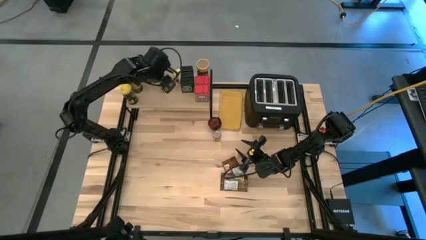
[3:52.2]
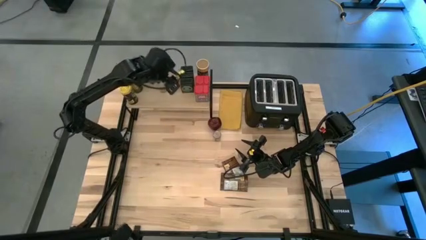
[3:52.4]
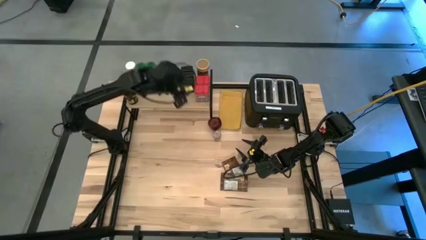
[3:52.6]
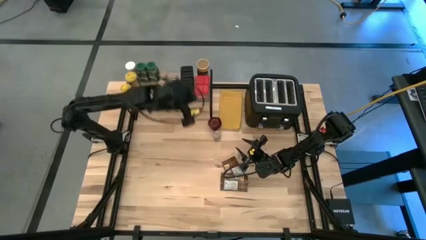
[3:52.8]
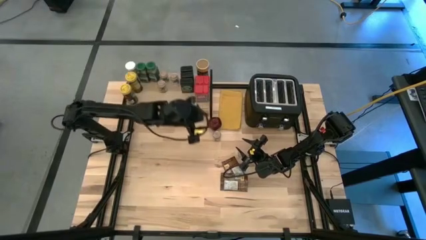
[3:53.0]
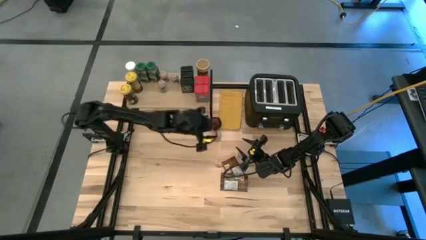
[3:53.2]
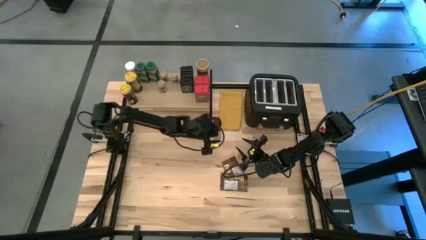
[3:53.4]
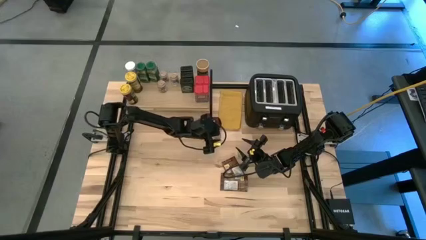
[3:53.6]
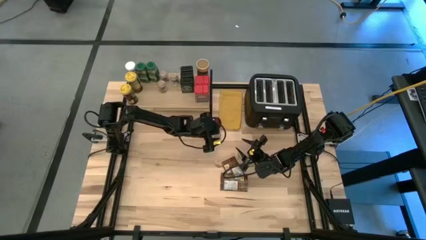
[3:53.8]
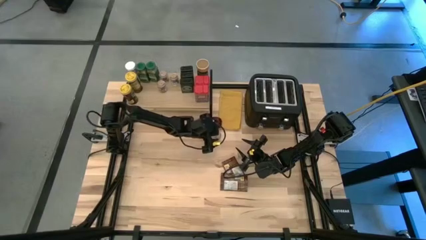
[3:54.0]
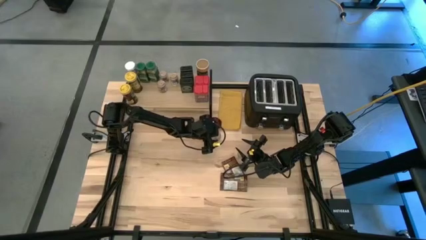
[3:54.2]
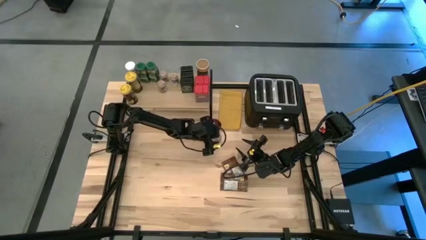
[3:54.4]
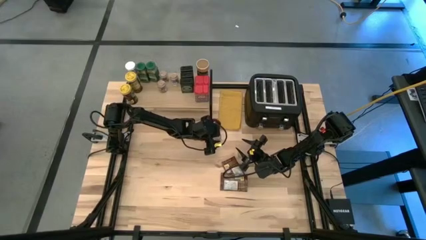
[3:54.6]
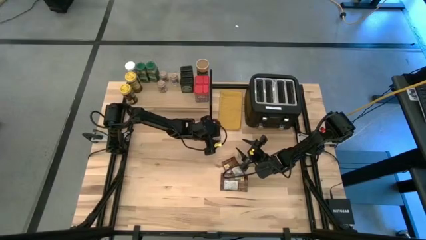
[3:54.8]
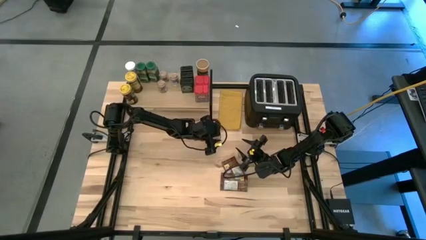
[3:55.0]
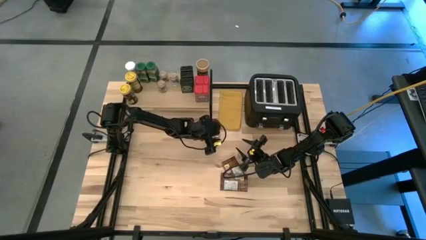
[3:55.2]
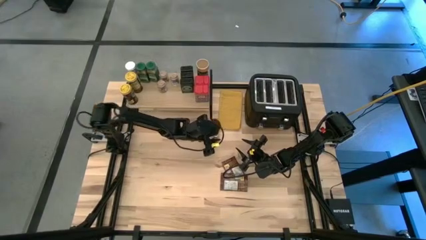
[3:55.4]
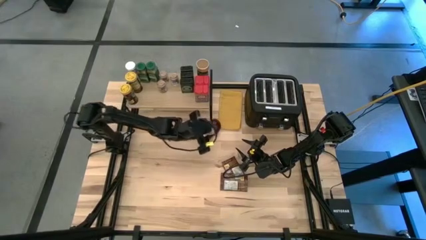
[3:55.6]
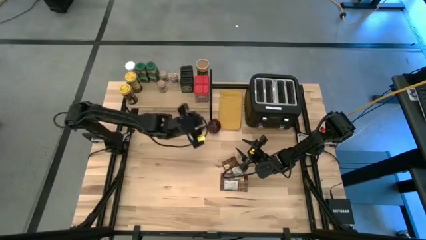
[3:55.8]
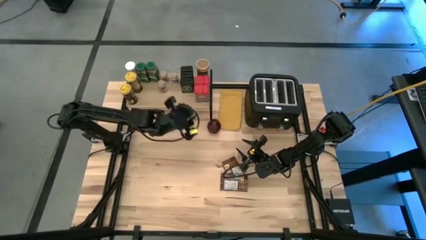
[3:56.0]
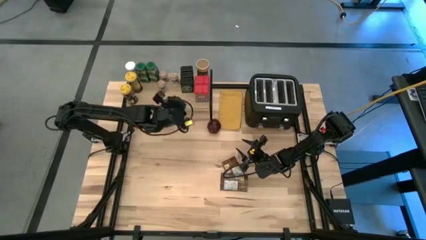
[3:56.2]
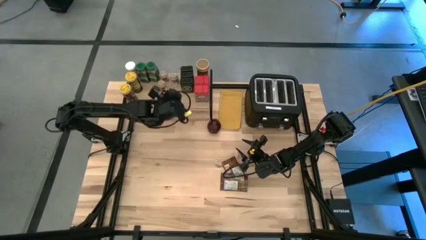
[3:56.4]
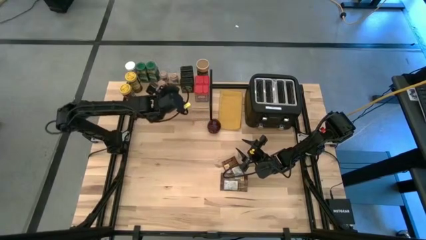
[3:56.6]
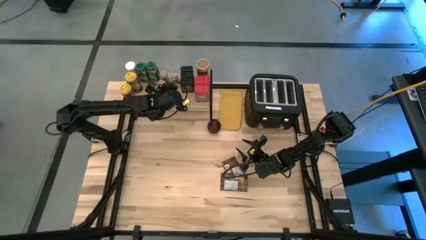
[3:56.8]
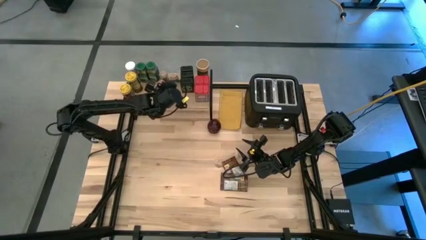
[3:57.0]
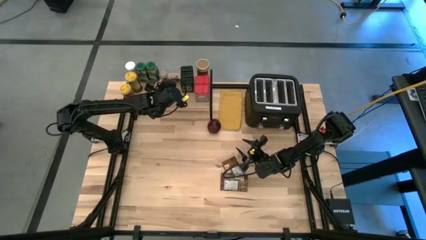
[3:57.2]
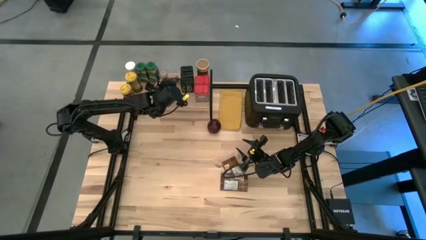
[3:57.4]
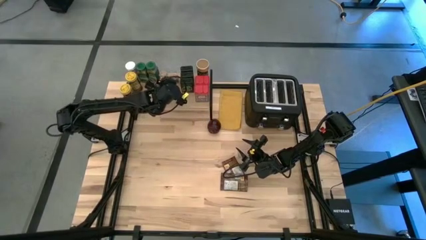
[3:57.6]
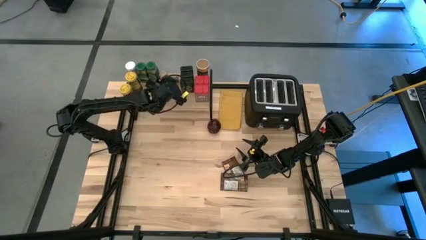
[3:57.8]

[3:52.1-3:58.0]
Task: Shelf spices
Put the brown seasoning bottle aligned with the other brown seasoning bottle on the shelf

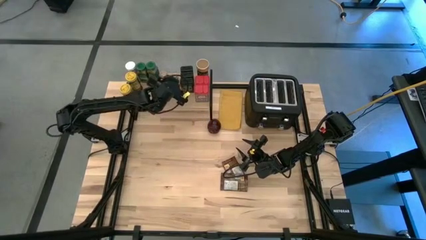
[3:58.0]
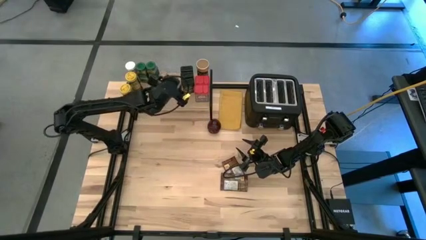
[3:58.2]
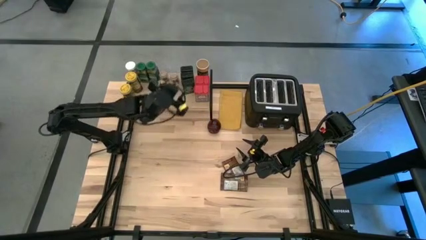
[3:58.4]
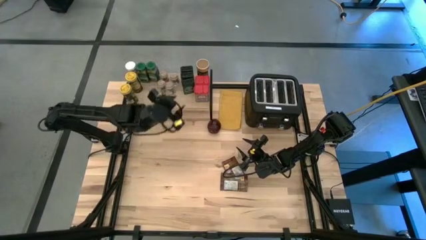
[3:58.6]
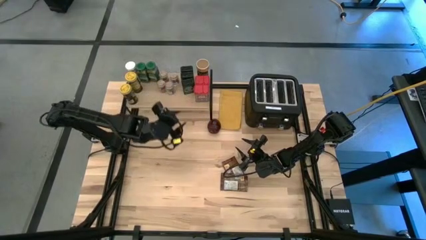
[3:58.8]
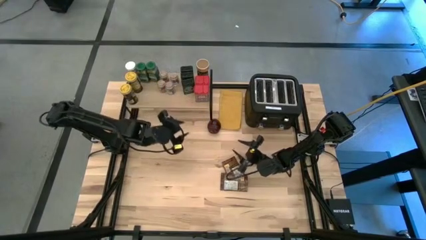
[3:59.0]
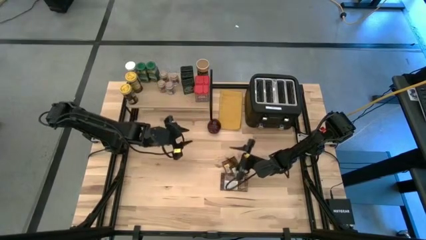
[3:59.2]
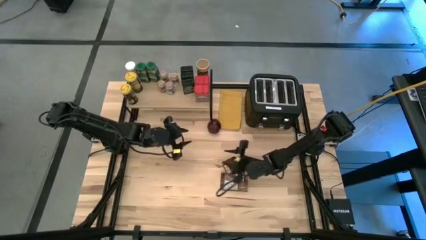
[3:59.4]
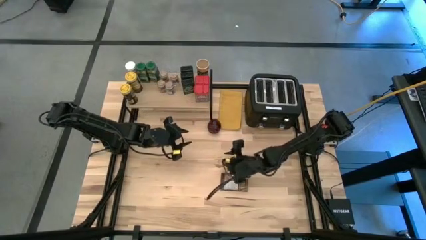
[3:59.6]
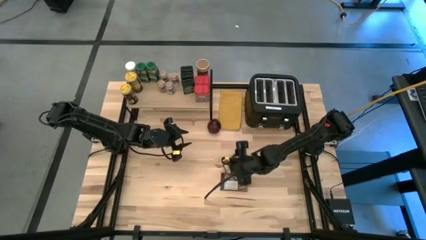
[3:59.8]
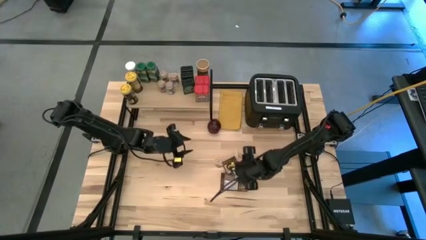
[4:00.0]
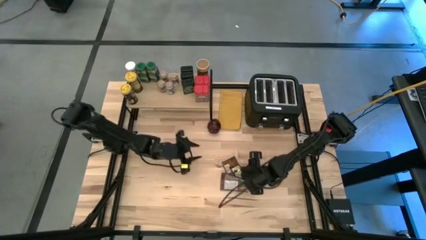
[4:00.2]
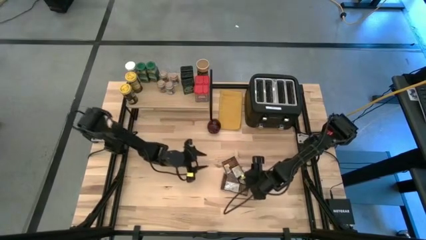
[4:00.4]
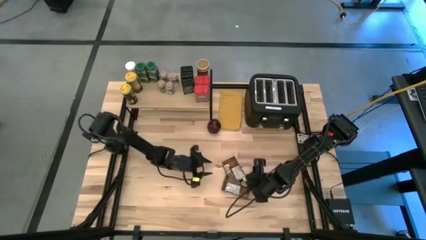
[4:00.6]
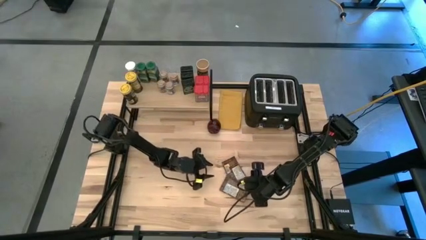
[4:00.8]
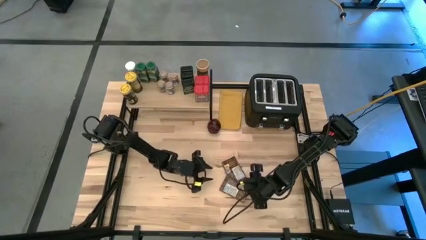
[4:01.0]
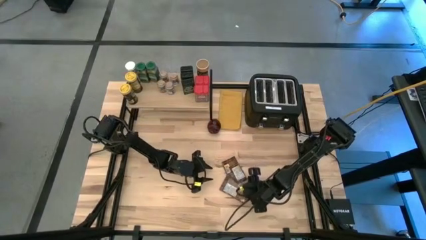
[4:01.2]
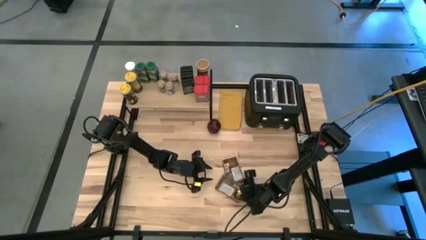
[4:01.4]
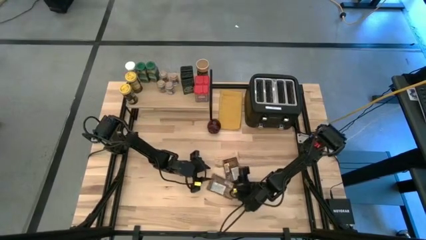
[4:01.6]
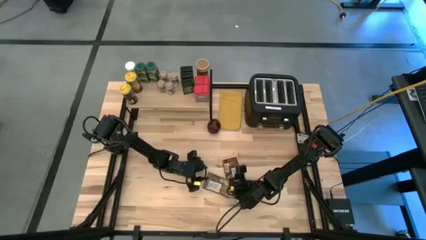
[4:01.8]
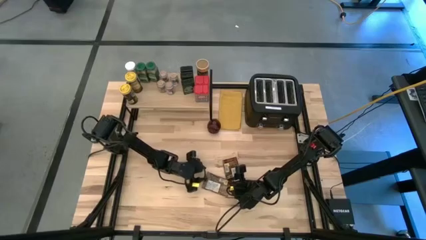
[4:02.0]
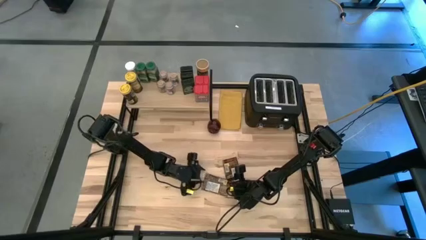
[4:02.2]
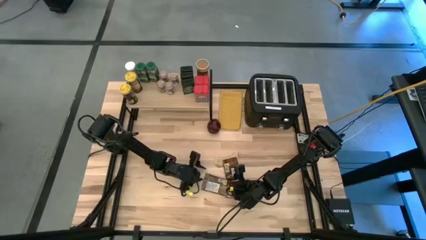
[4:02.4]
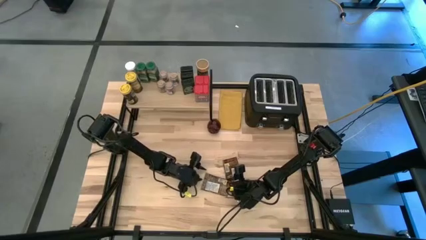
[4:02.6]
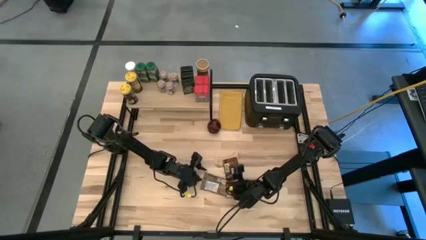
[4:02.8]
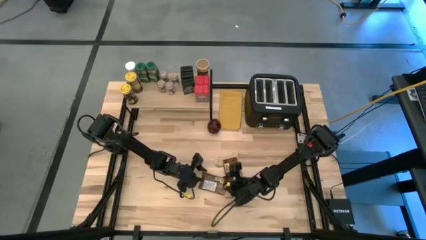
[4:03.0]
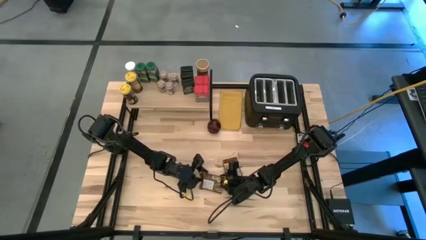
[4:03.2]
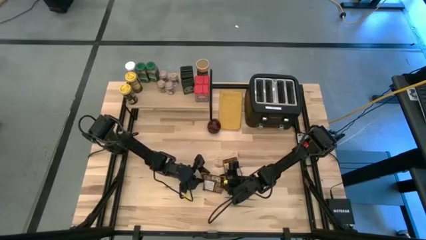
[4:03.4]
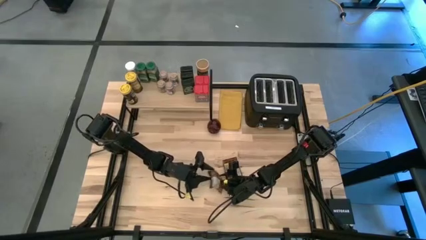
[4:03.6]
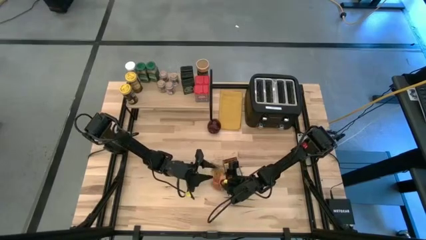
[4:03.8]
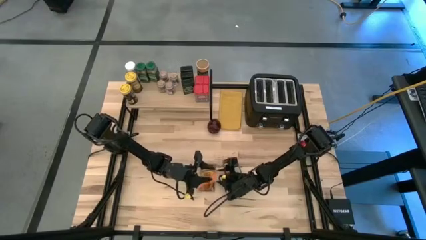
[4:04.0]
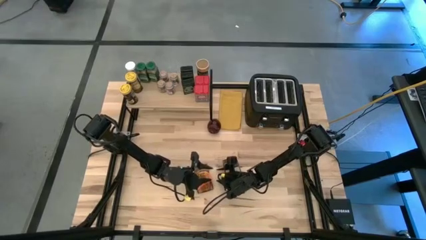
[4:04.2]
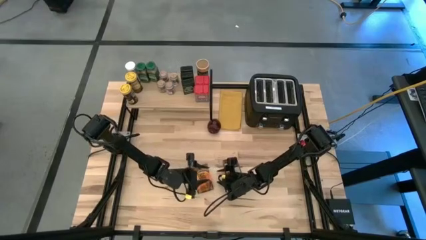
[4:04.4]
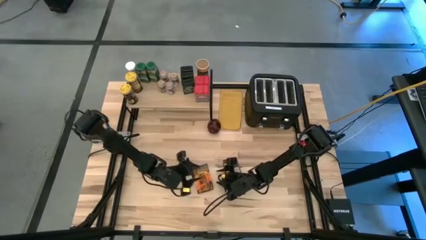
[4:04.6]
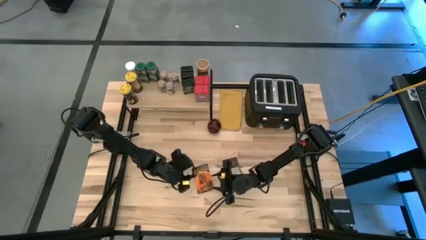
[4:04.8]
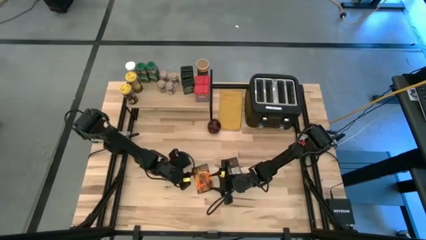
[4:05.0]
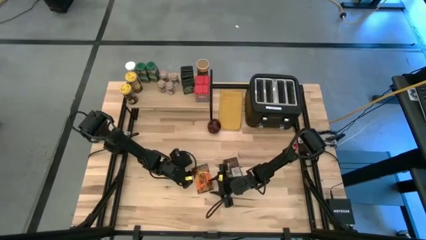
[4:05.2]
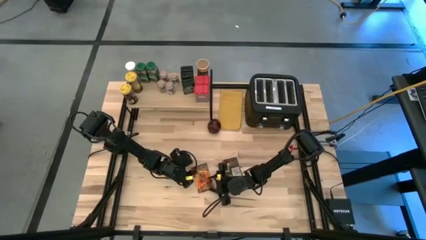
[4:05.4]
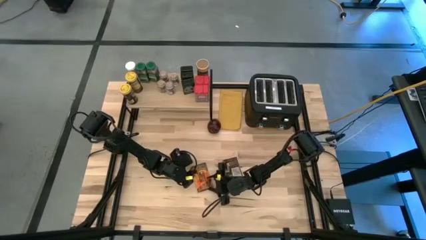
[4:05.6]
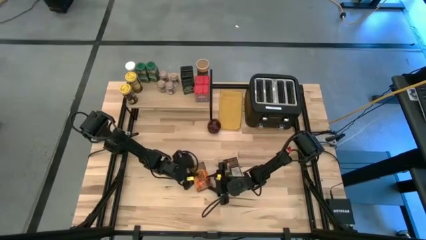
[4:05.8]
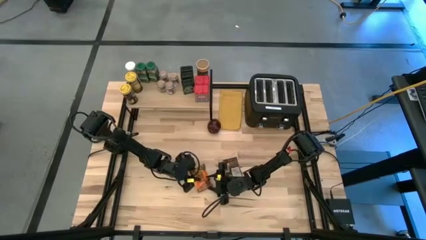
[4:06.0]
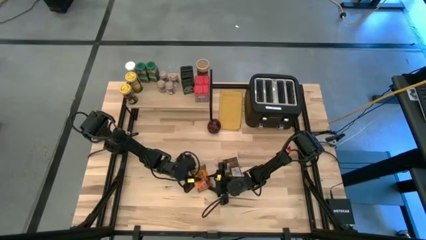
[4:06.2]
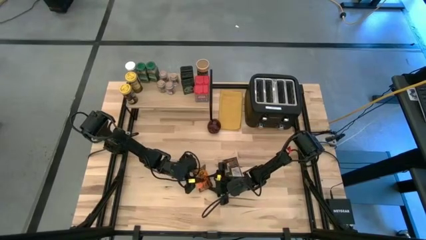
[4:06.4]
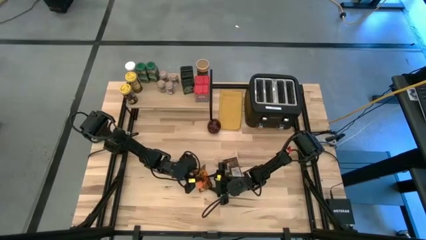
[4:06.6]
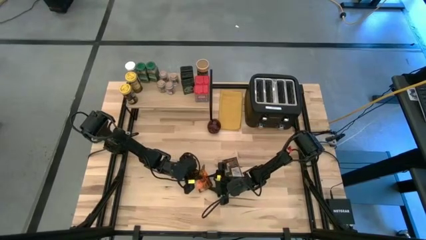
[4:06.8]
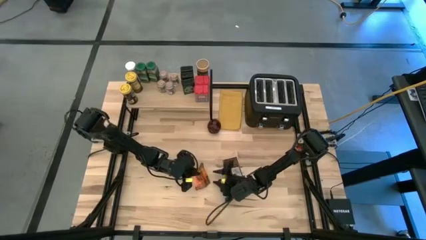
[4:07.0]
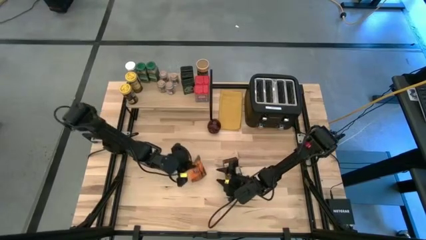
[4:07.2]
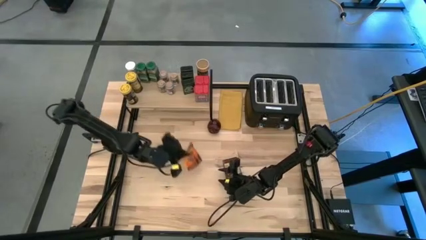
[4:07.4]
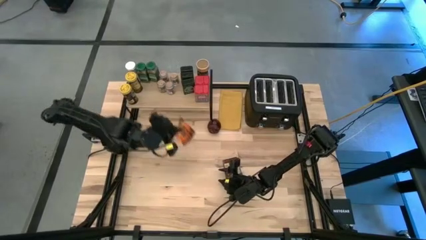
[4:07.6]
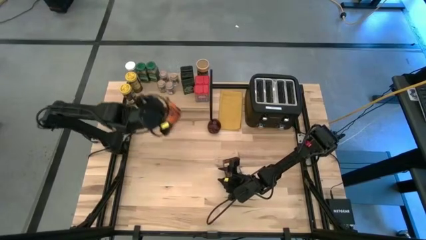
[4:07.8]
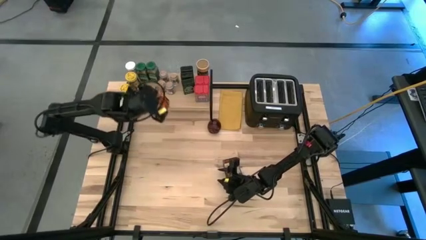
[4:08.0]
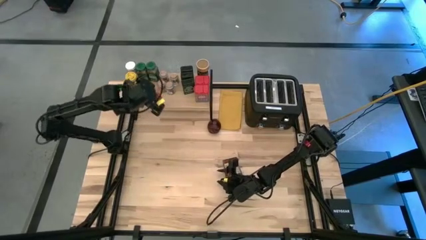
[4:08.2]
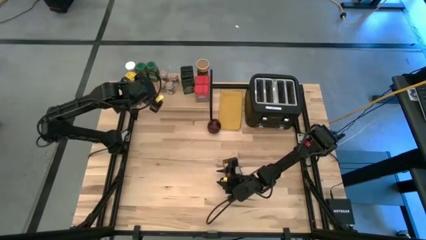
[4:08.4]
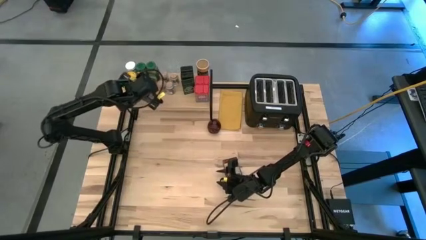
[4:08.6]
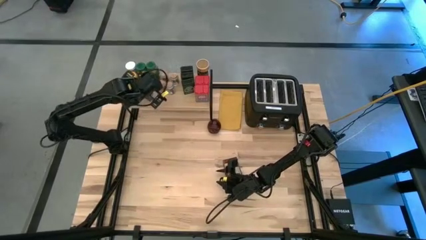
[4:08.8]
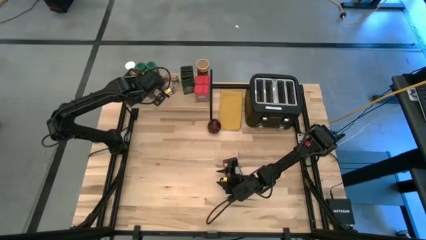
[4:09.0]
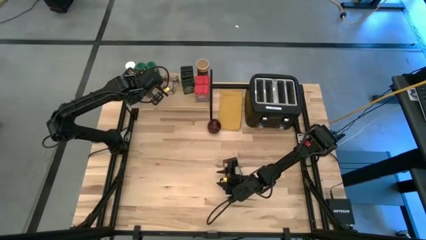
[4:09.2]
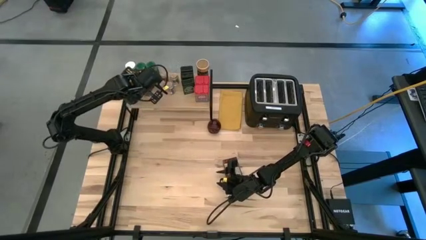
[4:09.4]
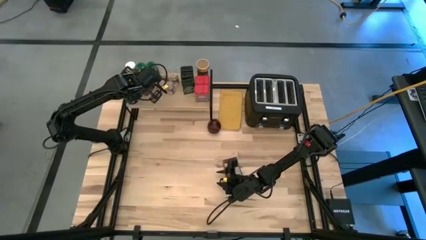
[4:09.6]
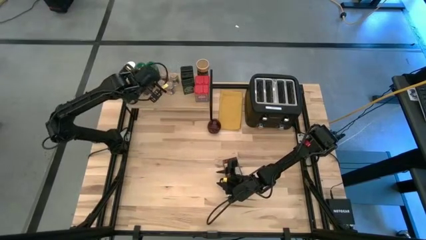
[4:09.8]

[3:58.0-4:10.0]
Put the bottom orange seasoning bag on the shelf
